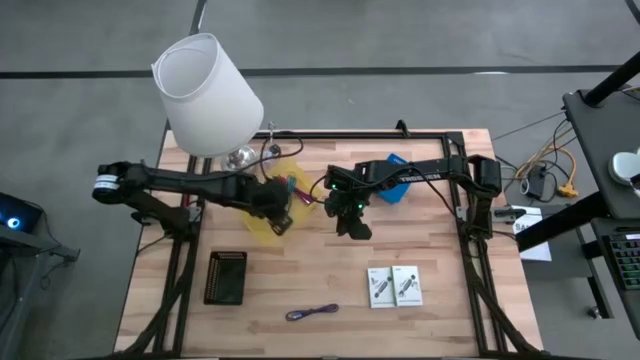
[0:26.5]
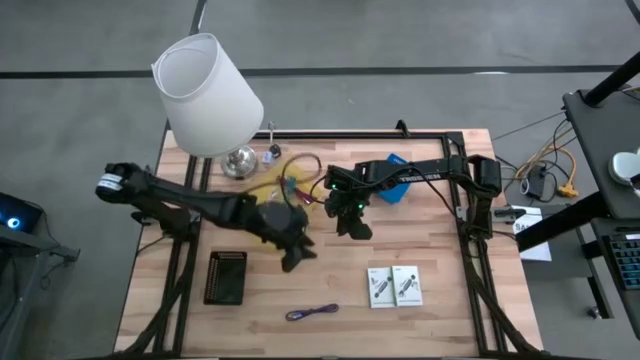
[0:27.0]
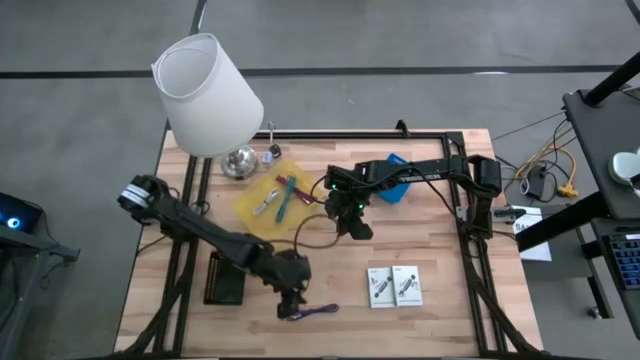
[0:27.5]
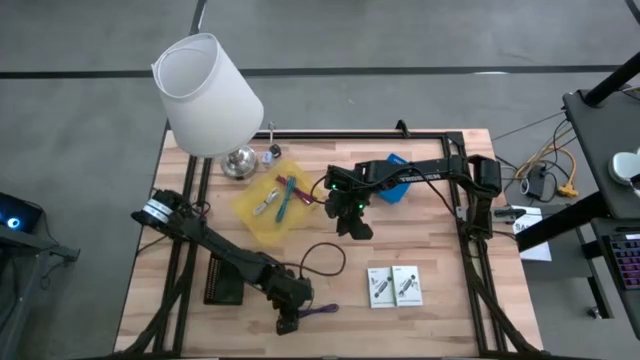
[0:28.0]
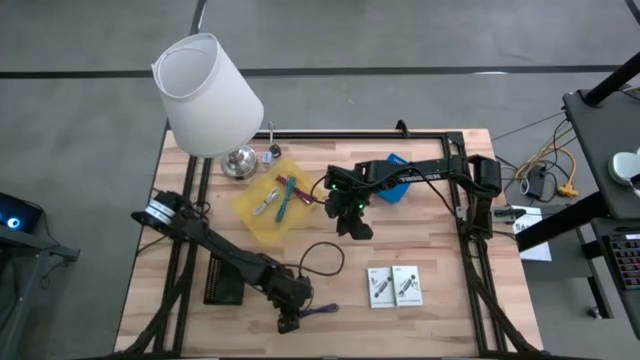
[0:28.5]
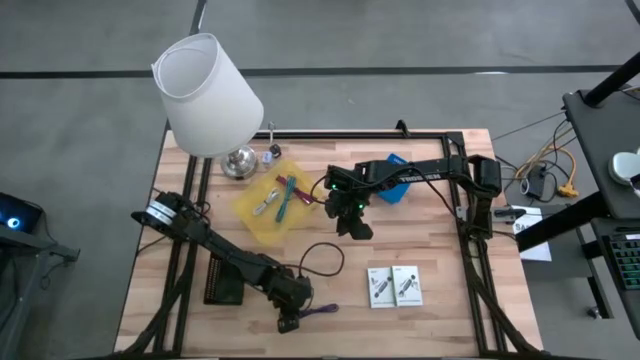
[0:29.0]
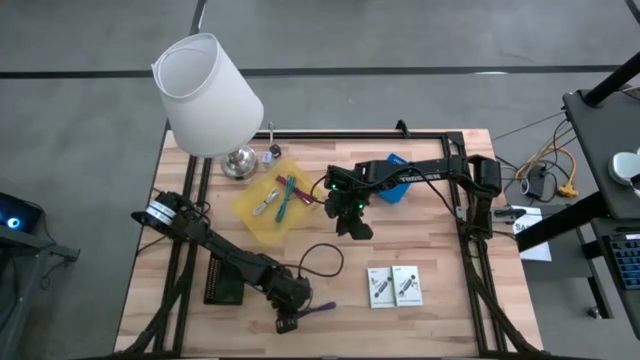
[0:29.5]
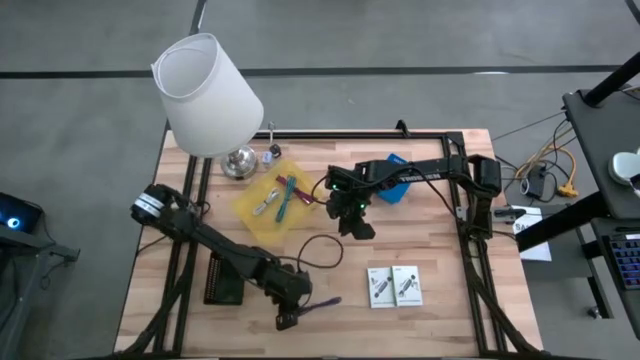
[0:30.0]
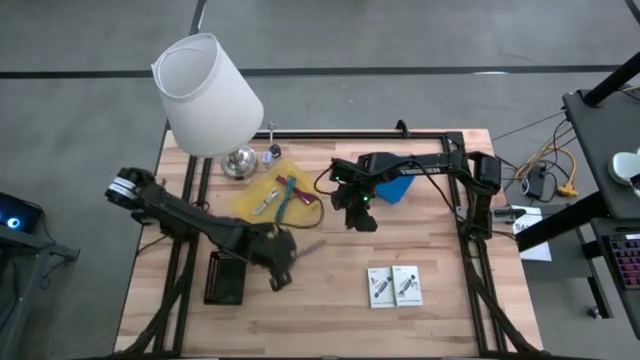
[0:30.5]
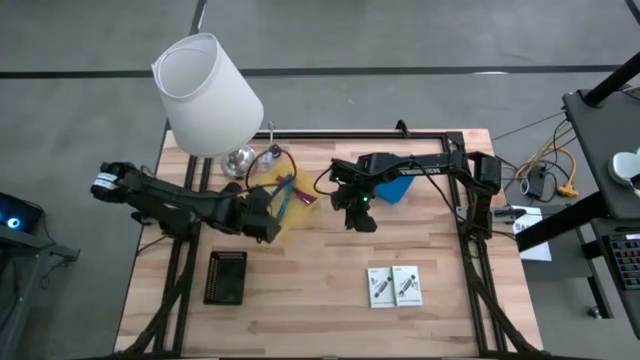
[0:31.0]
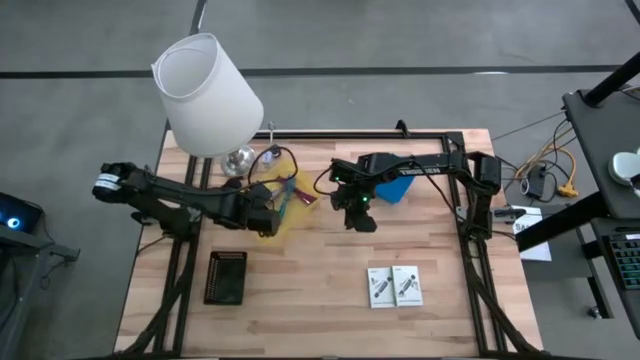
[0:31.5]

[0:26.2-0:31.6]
Task: Pick and place items into bin
Put the blue charger cable into the yellow bin

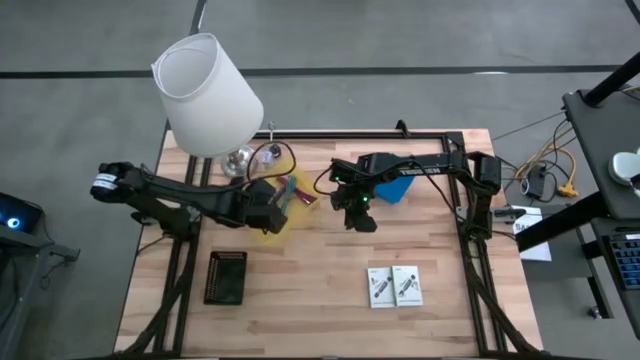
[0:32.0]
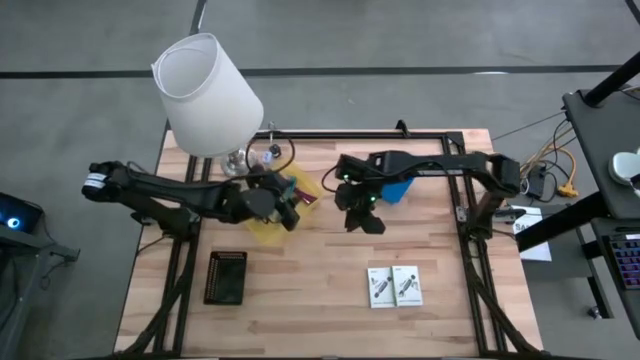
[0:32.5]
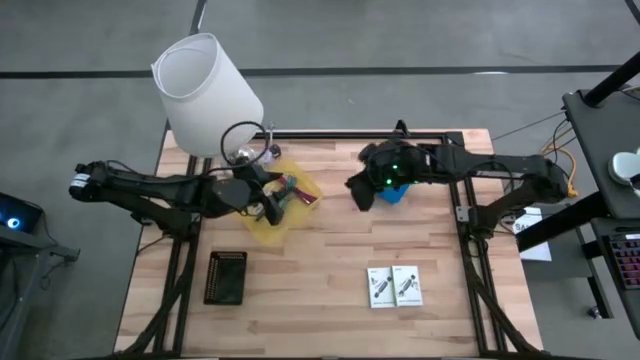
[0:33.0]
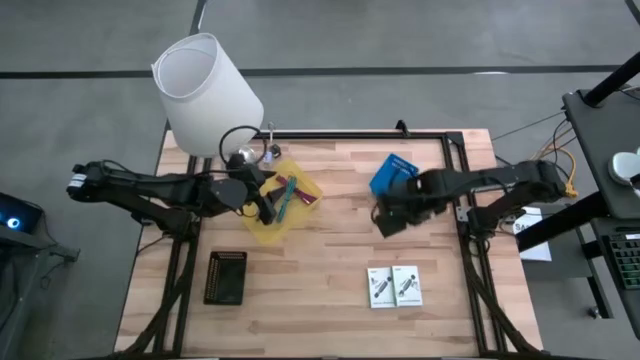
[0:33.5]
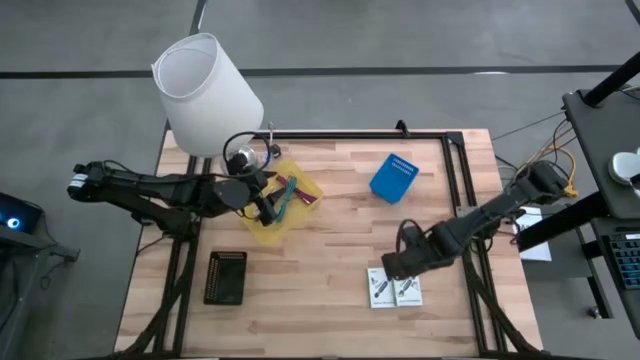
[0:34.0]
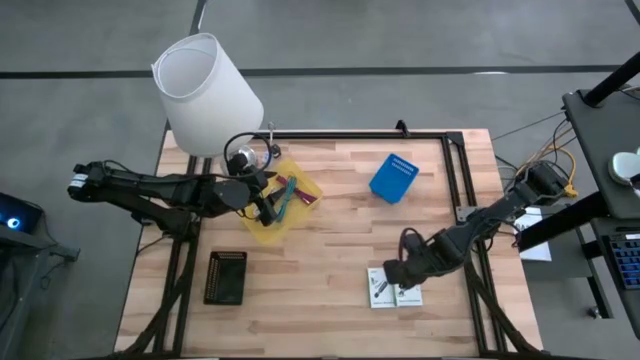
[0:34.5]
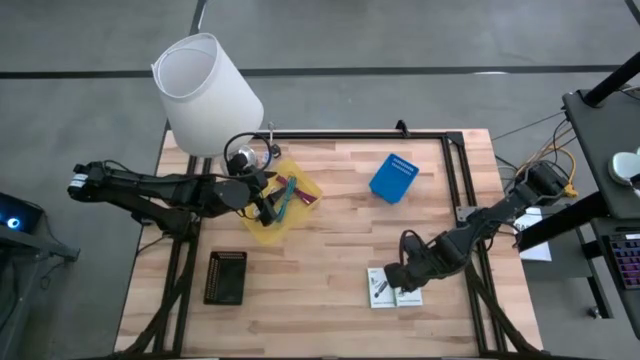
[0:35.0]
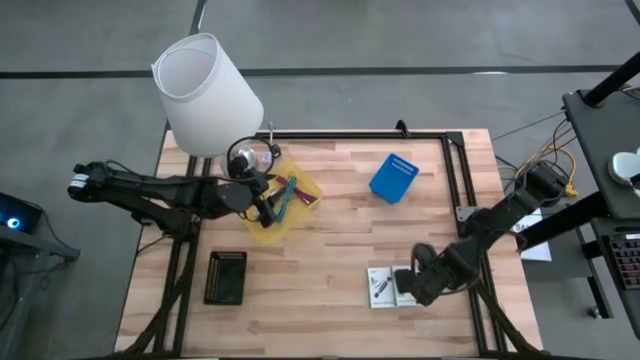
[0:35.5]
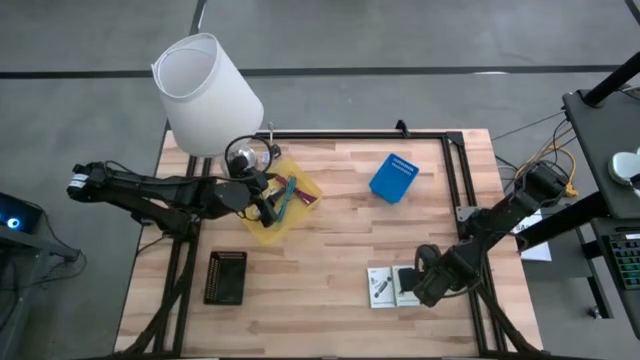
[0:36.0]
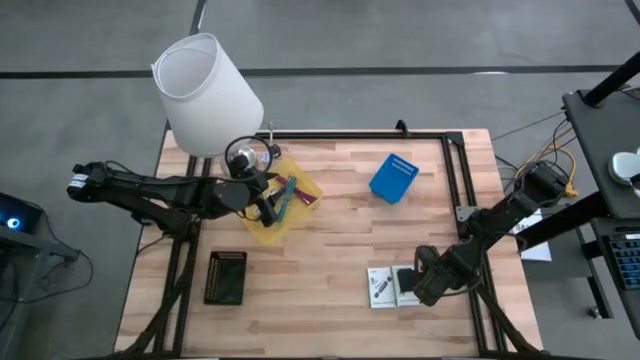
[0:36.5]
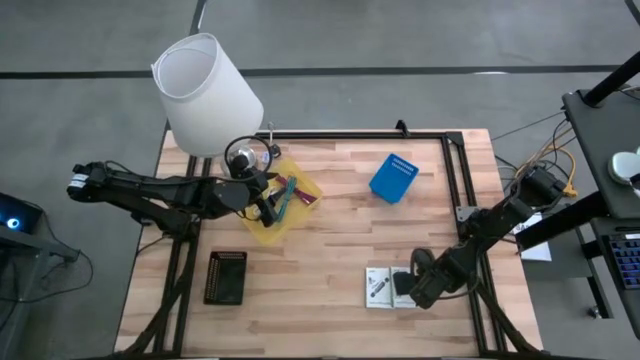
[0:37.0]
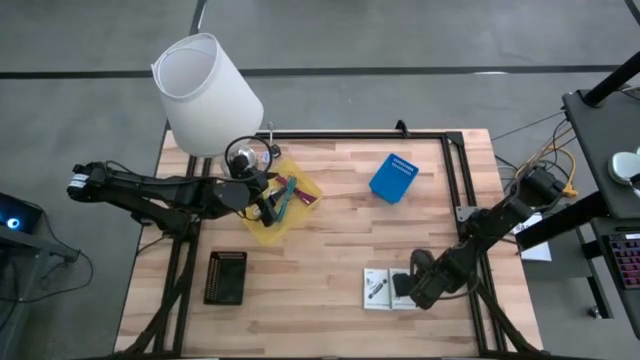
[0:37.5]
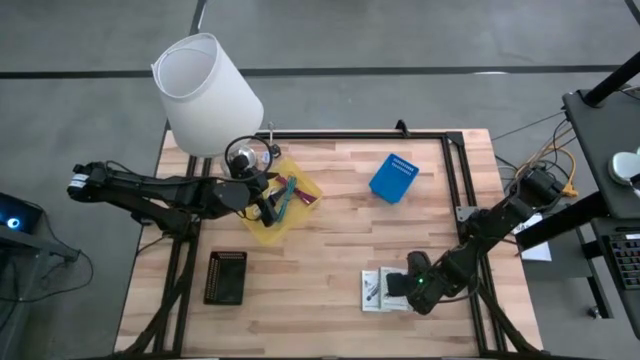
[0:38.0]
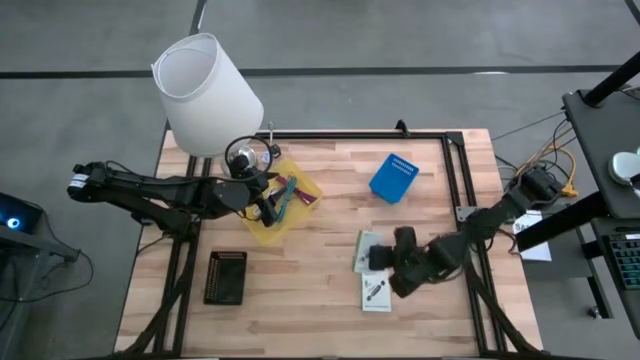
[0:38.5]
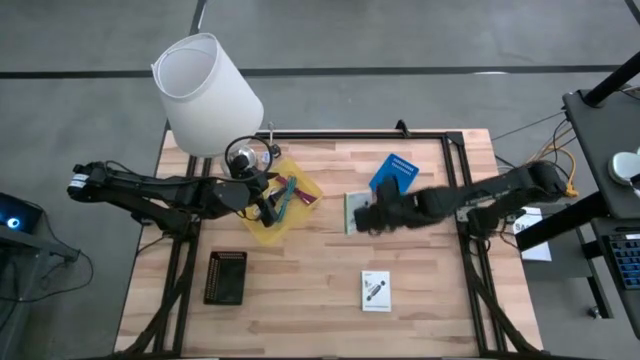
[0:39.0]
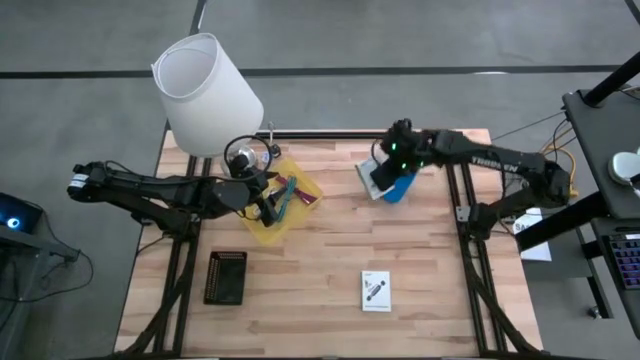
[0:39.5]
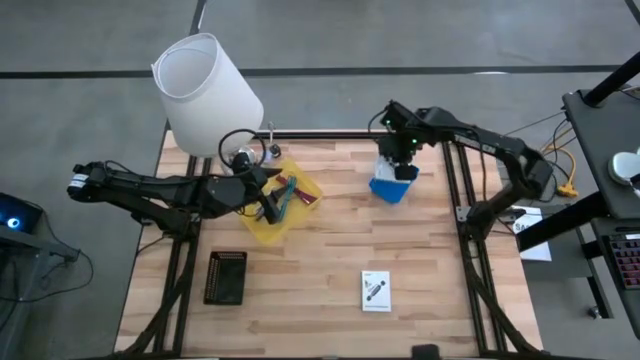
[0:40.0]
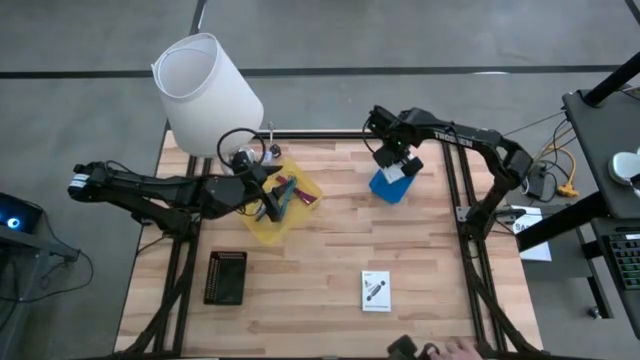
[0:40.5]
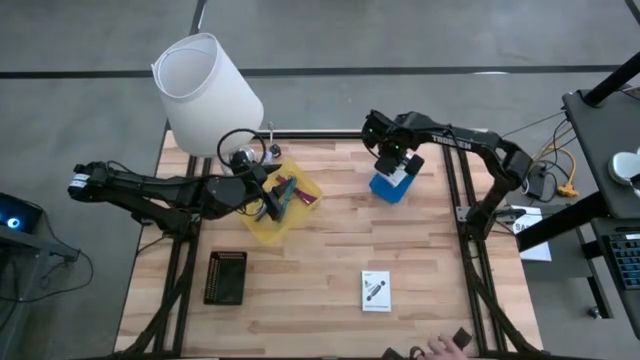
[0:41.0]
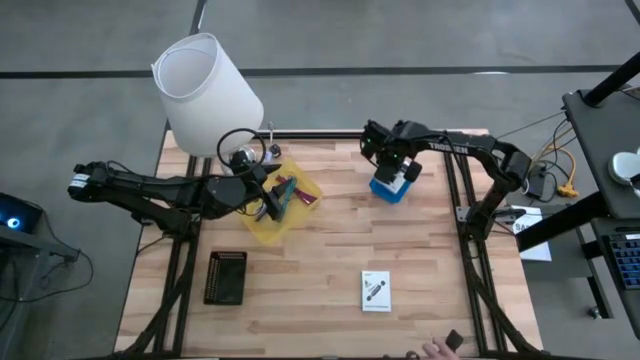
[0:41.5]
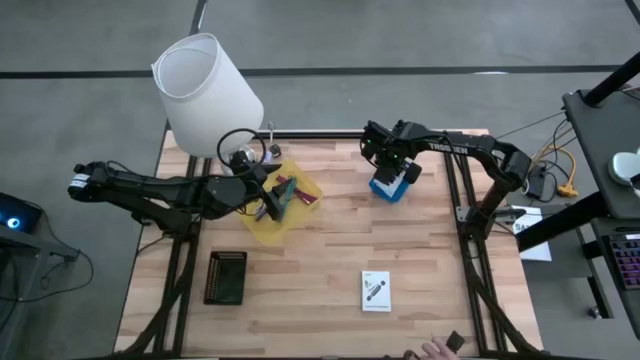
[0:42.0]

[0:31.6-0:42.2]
Put the right card reader box into the blue bin

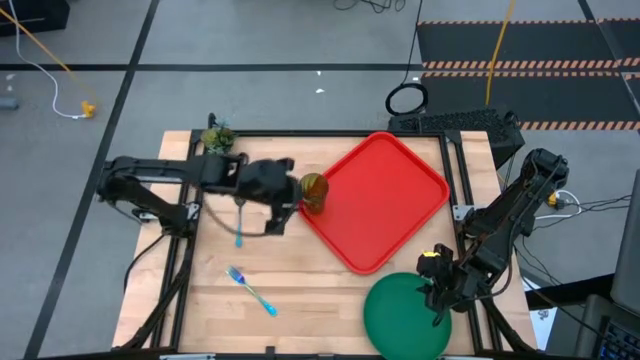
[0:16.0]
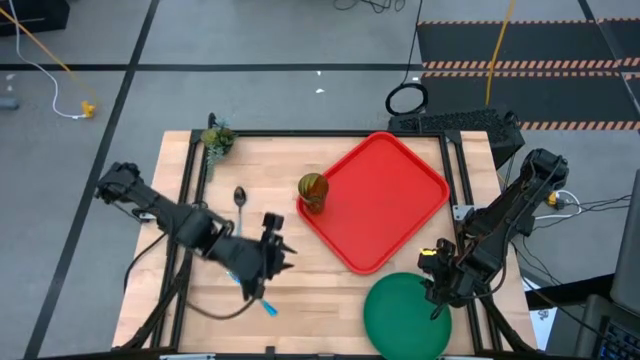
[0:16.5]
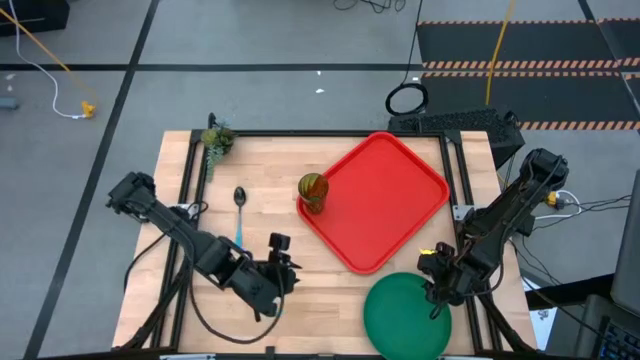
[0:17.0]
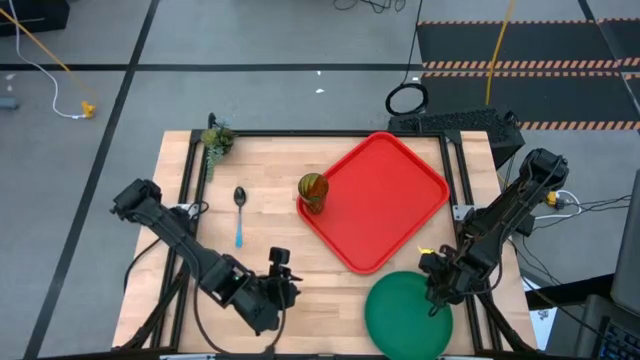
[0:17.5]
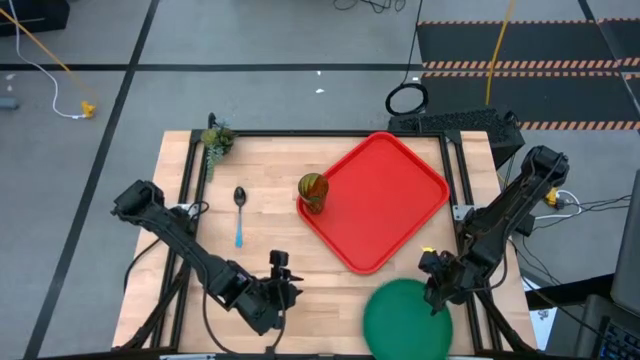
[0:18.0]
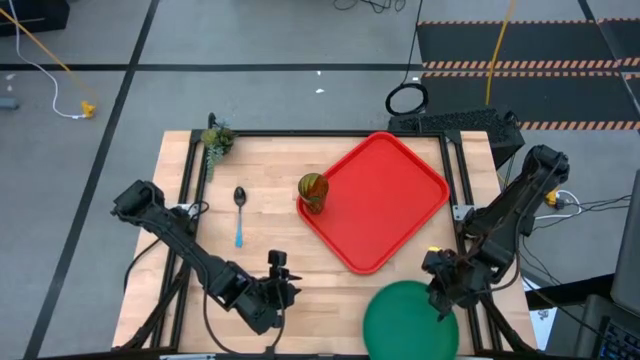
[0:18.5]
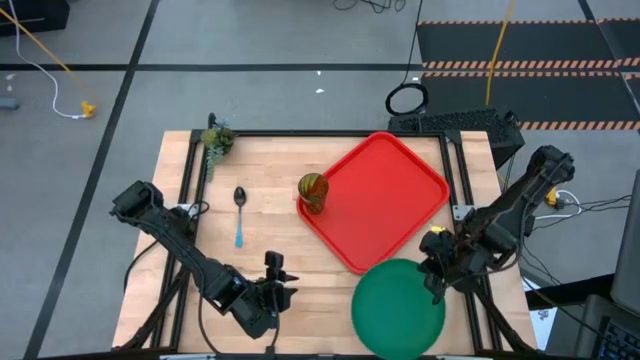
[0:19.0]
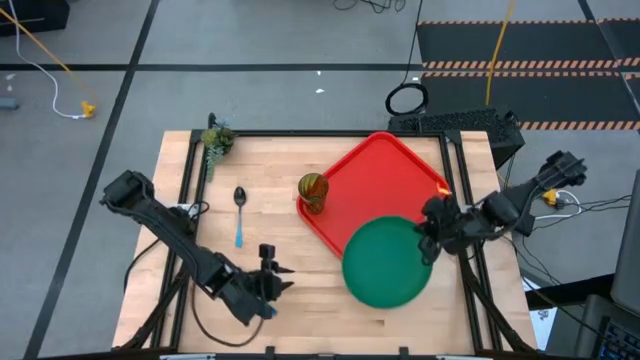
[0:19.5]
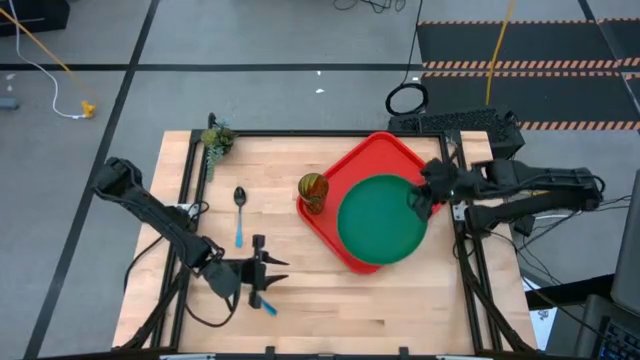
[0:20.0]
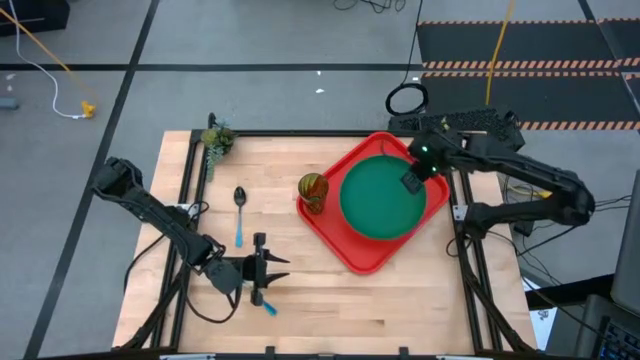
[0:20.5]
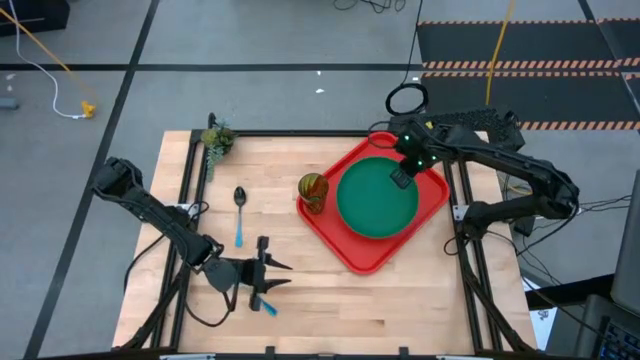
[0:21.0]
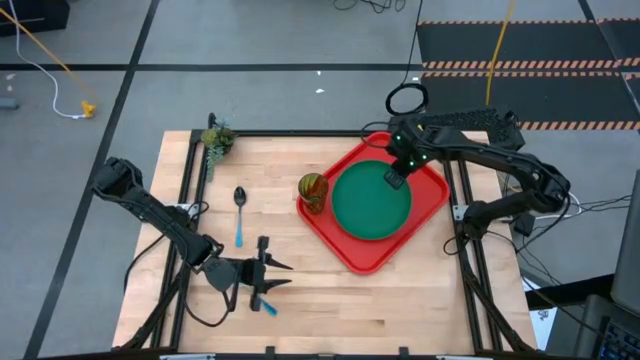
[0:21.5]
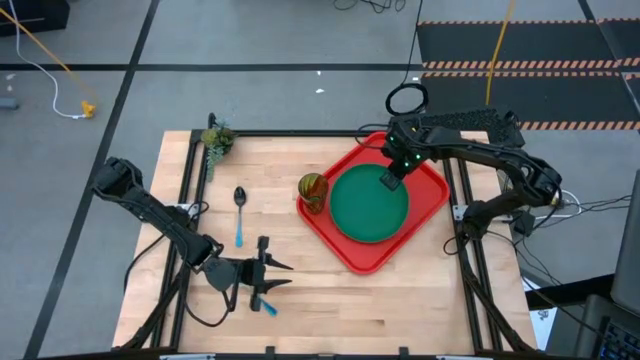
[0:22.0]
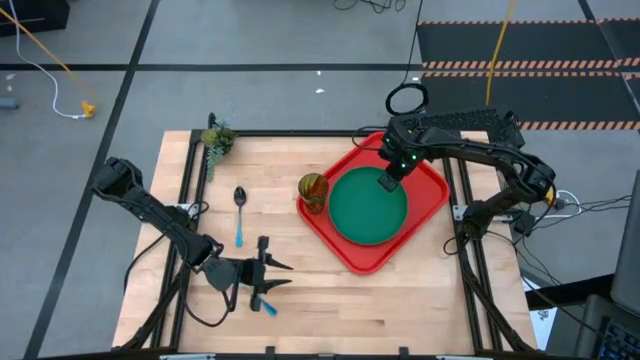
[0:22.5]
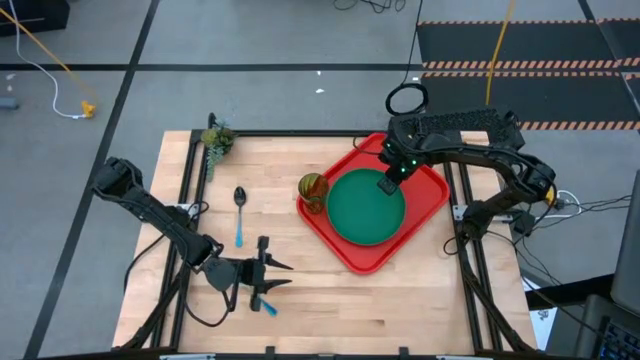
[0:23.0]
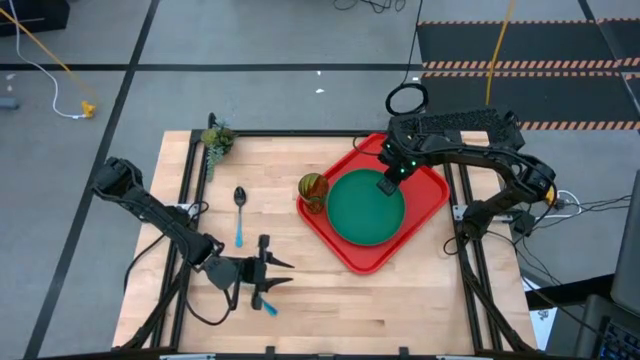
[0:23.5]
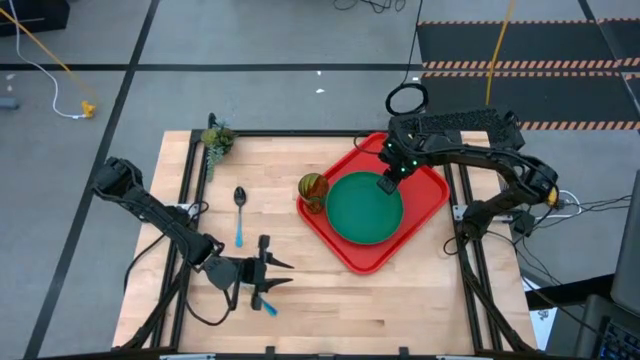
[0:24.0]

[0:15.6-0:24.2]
Task: Pick and place plate/cup/fork/spoon on tray
Put the green plate on the red serving tray
